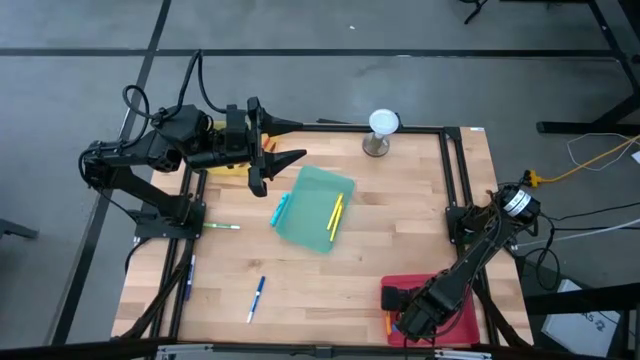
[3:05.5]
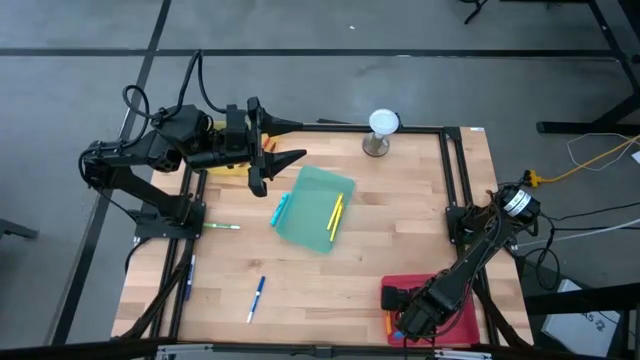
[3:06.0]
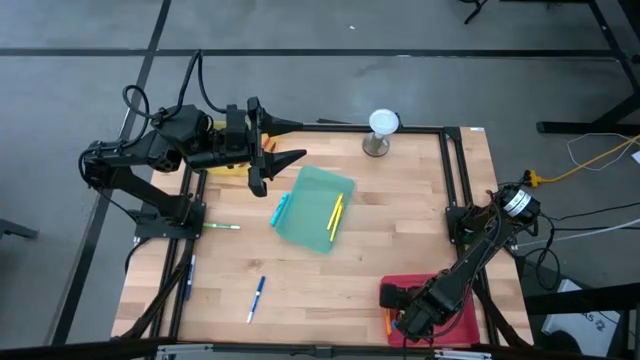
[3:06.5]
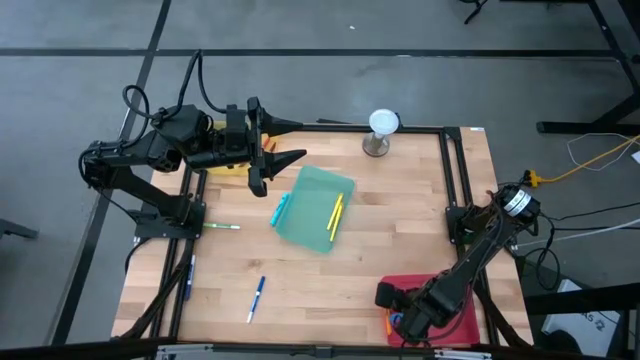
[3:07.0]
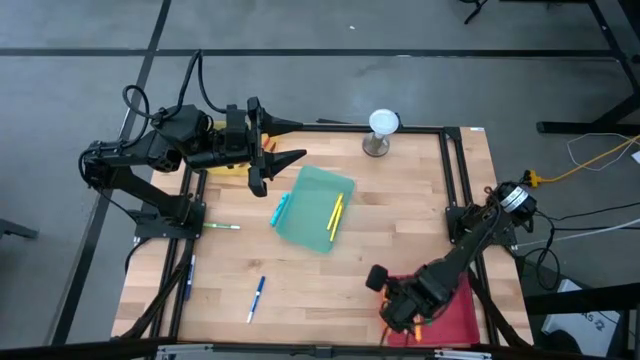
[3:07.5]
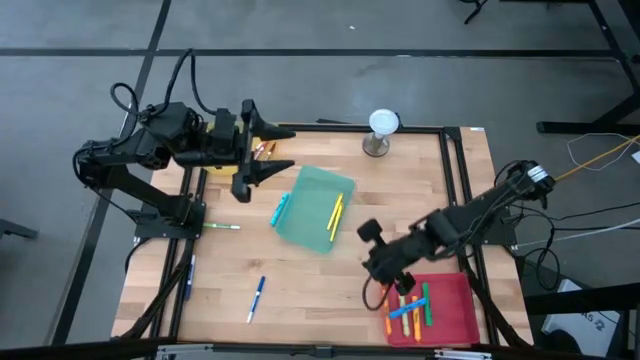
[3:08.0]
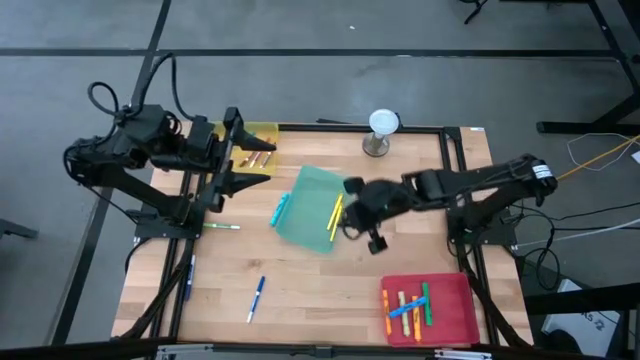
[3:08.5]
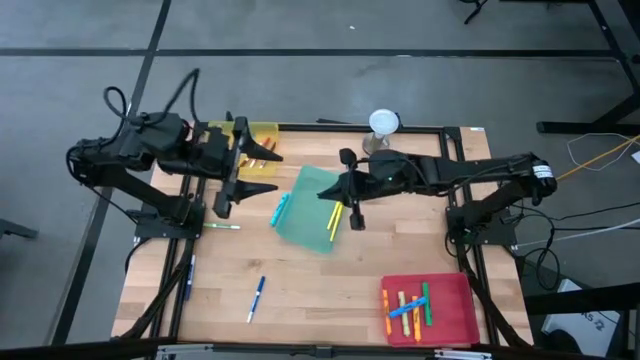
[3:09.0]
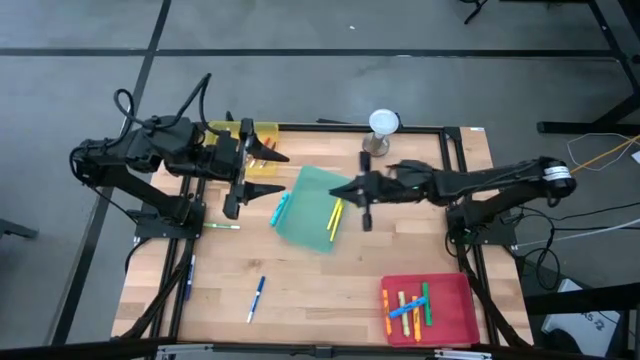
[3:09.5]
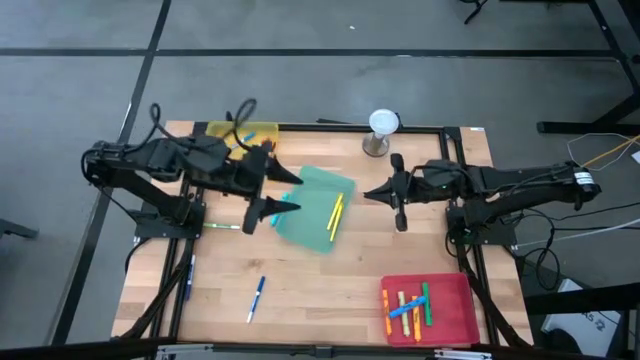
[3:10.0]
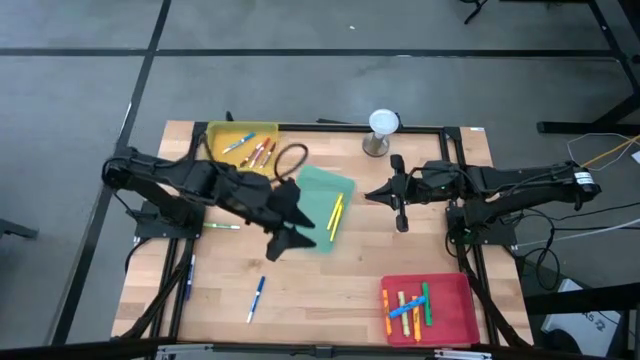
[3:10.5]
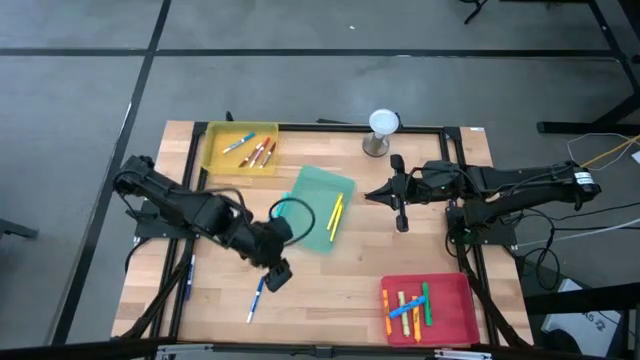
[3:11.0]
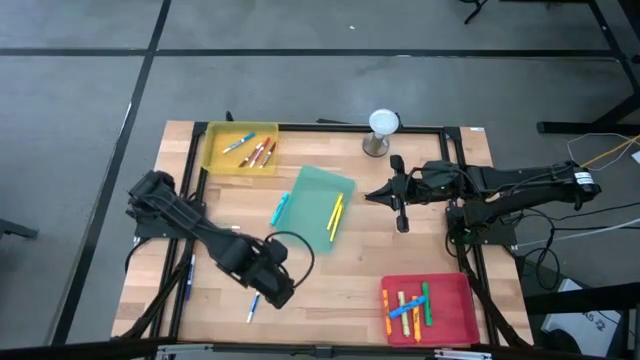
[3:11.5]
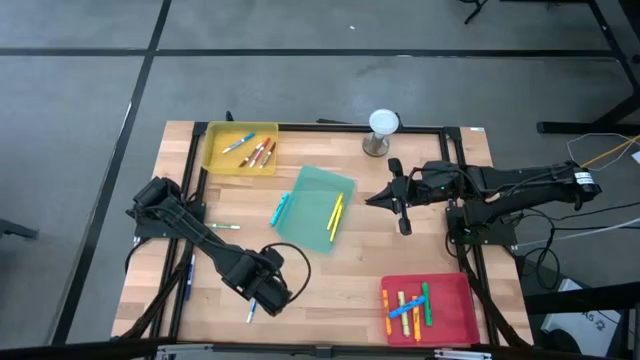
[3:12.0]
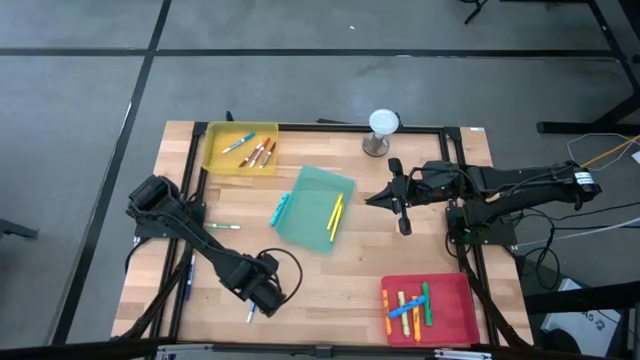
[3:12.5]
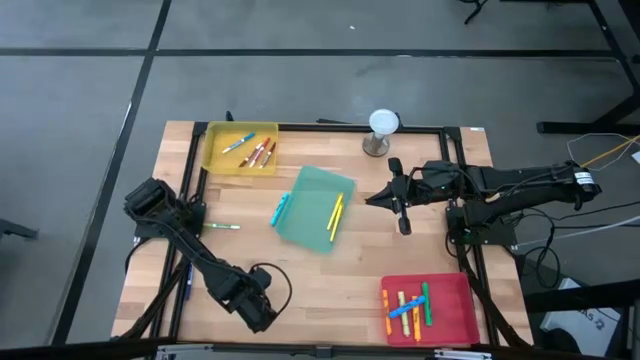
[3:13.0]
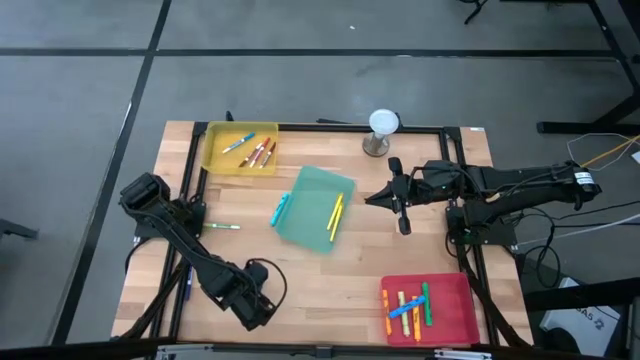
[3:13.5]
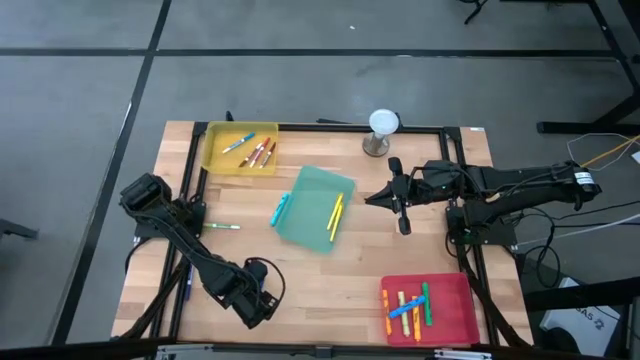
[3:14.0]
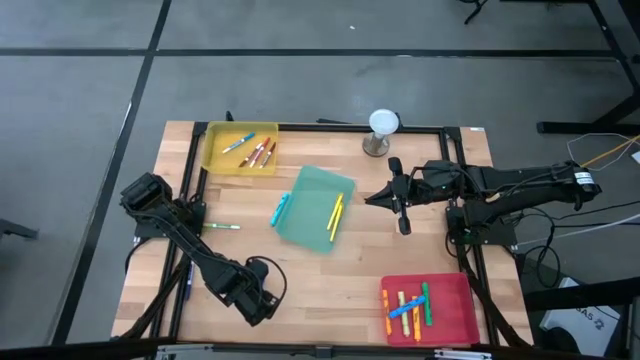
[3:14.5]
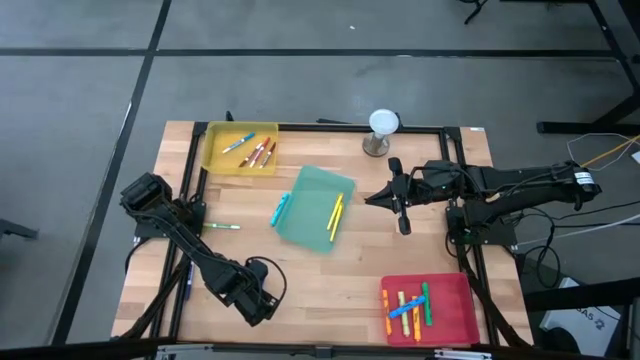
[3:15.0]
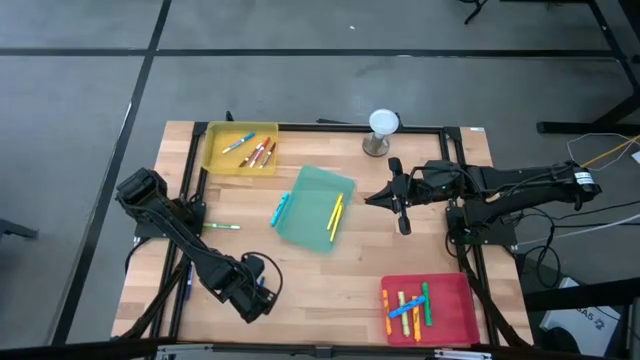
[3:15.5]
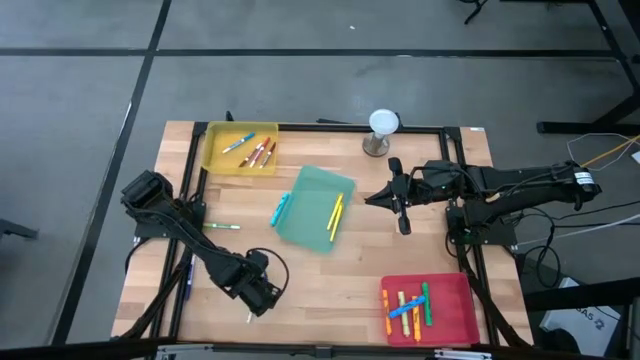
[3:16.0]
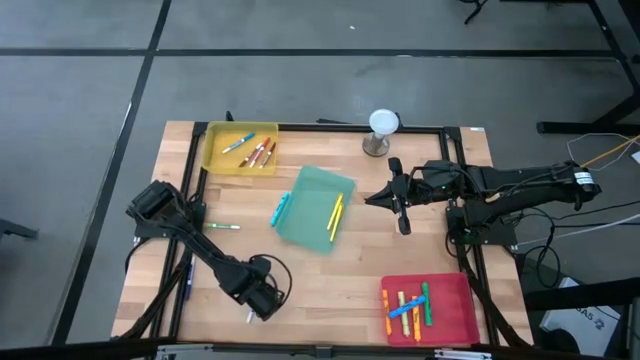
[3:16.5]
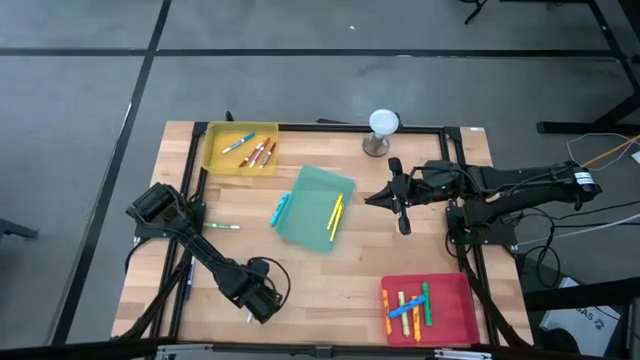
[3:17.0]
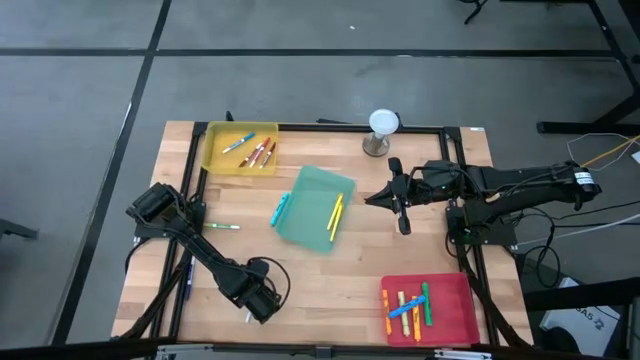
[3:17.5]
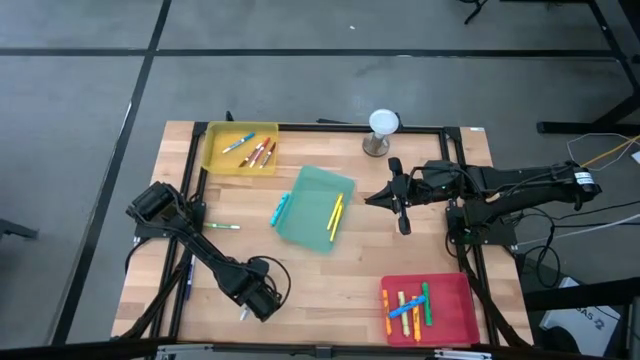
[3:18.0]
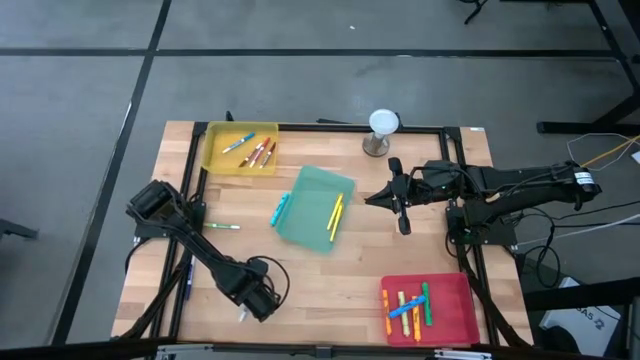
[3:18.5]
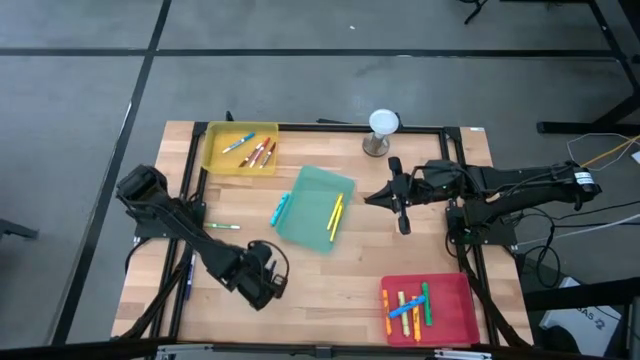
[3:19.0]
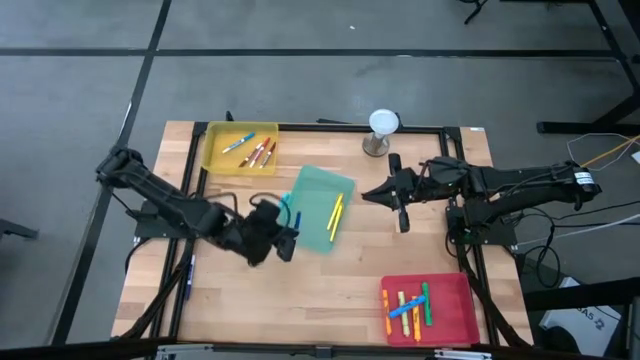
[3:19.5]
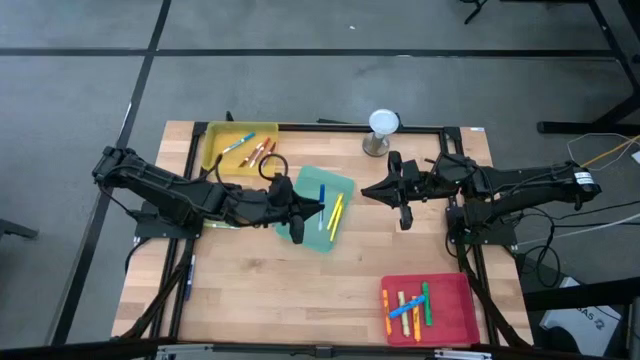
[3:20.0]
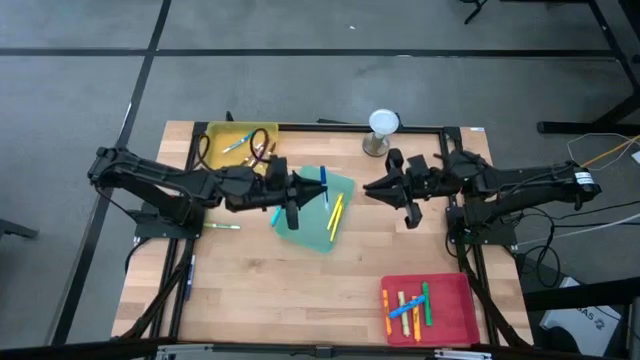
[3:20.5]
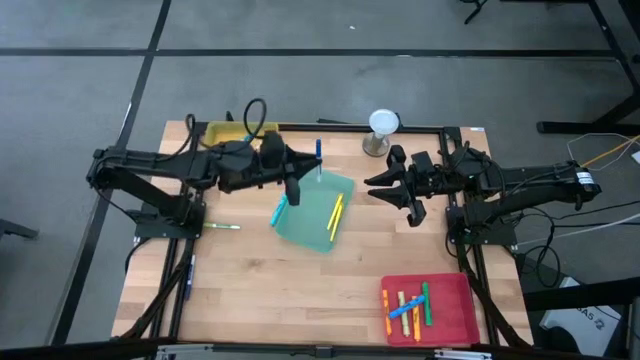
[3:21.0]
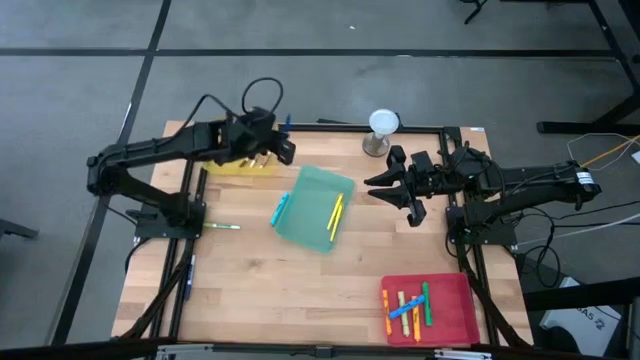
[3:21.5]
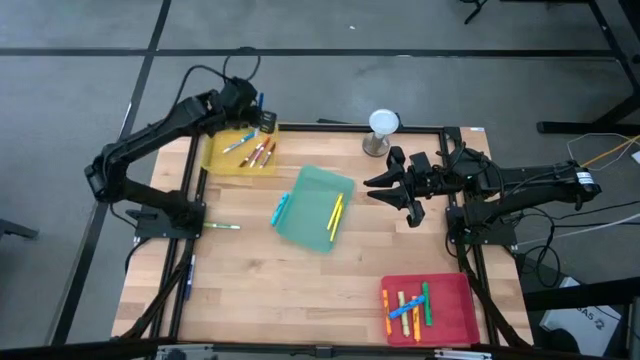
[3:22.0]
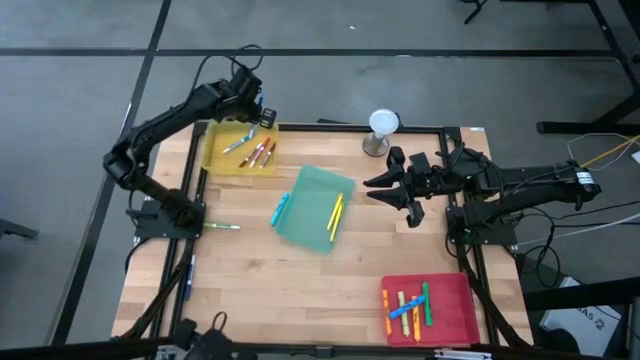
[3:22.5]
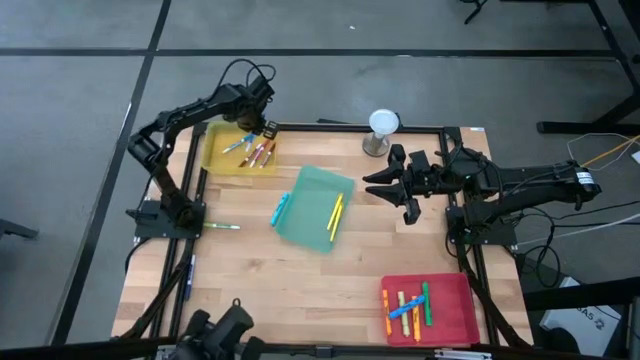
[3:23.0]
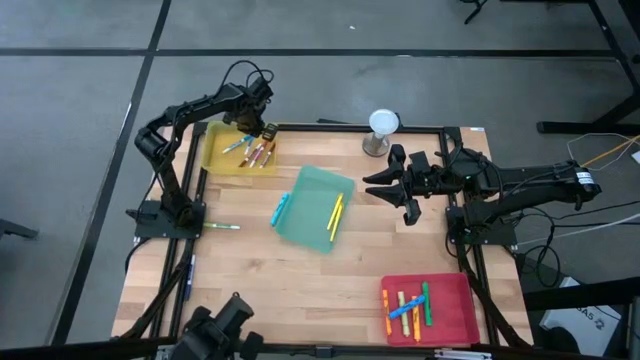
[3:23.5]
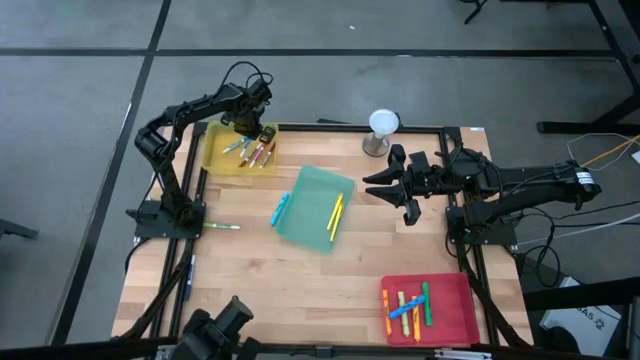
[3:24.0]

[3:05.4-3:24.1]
Task: Pick & Place Markers
Put the right blue marker pen into the yellow bin

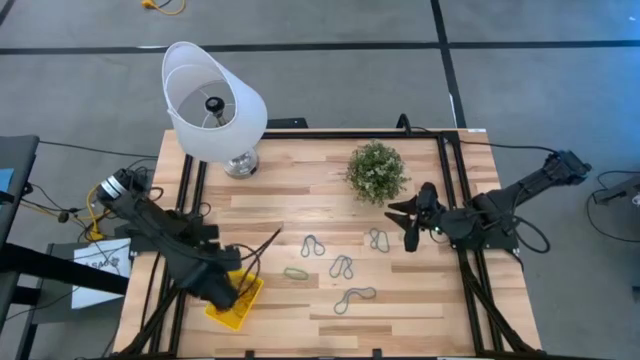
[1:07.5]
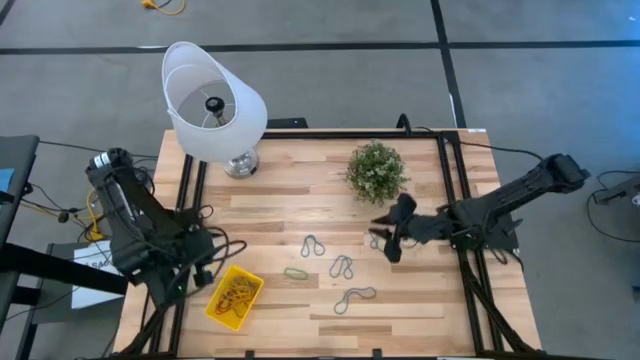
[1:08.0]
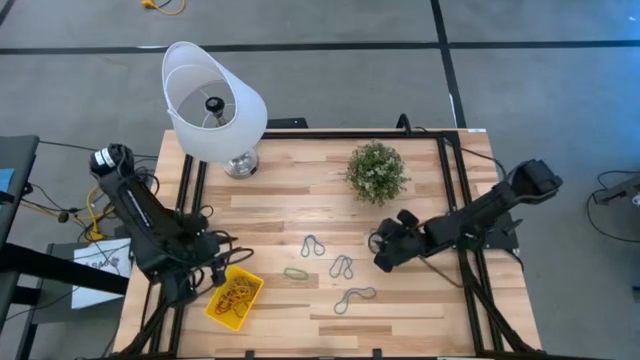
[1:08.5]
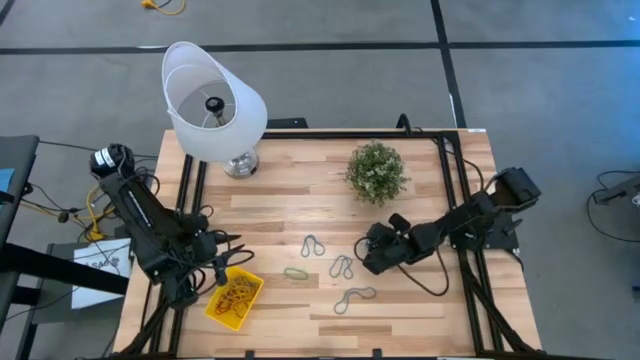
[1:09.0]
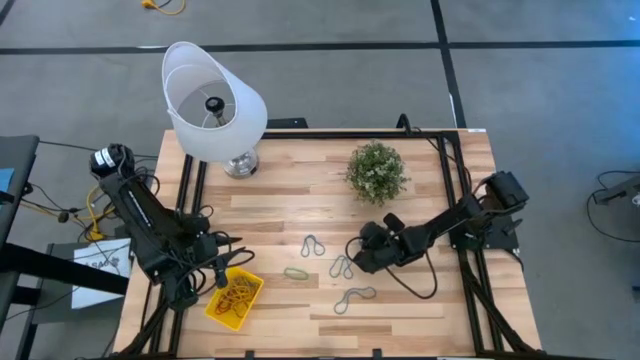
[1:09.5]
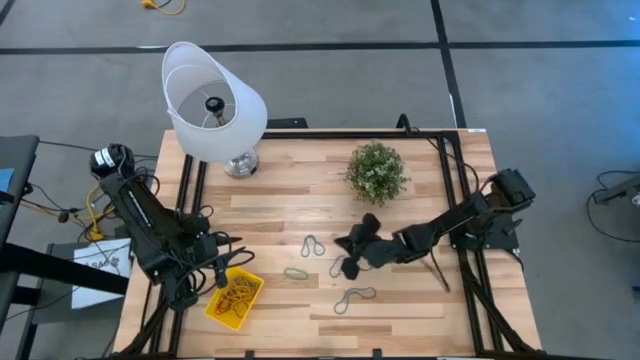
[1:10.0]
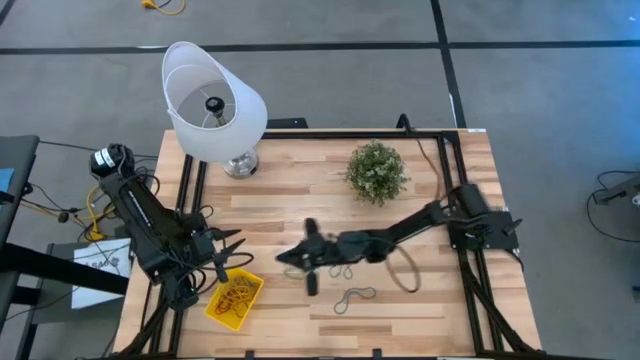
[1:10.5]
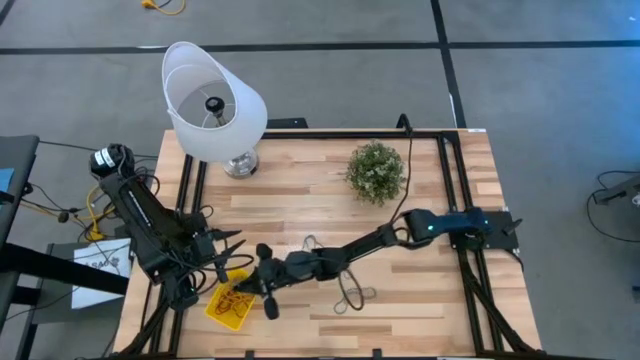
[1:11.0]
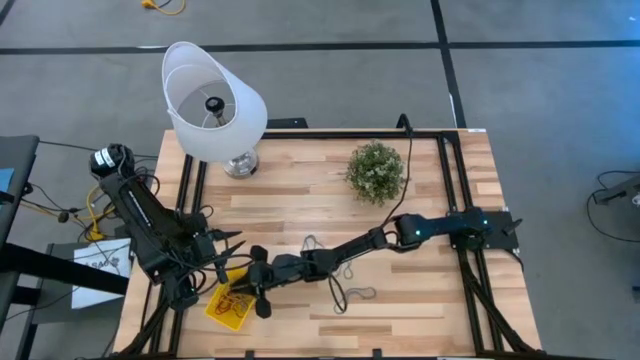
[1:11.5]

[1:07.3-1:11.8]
Task: Pick and place items into bin
Put the top right blue rubberband into the yellow bin
